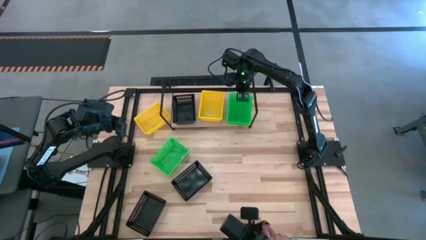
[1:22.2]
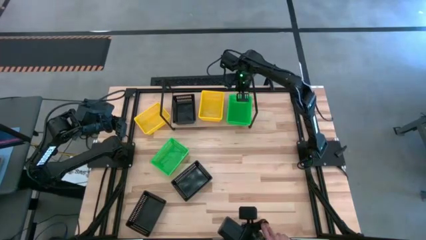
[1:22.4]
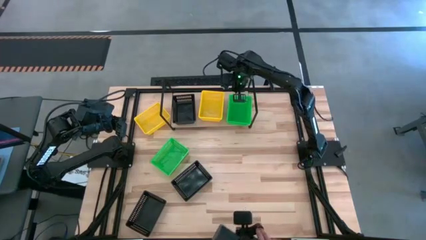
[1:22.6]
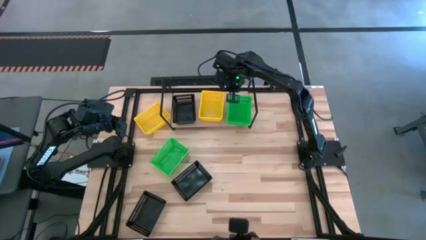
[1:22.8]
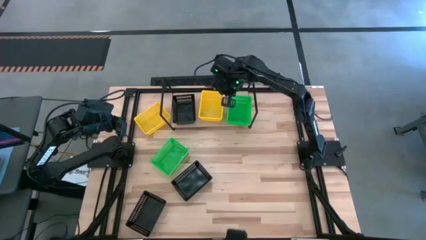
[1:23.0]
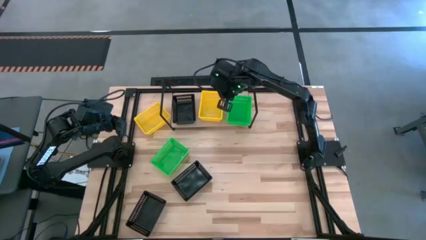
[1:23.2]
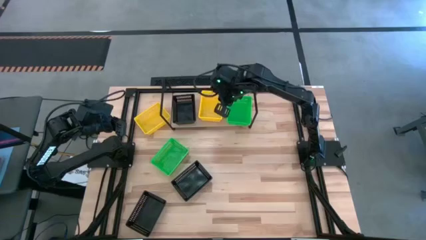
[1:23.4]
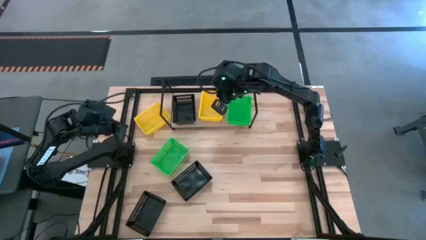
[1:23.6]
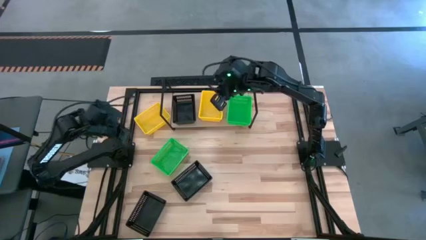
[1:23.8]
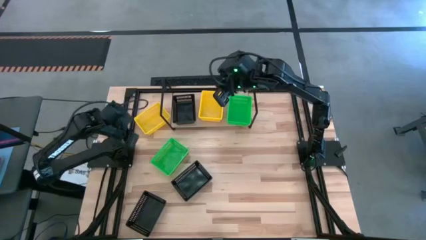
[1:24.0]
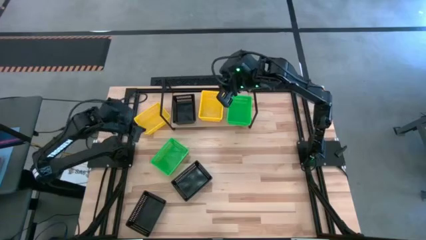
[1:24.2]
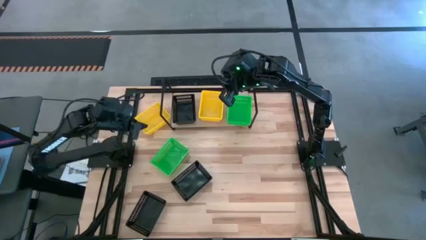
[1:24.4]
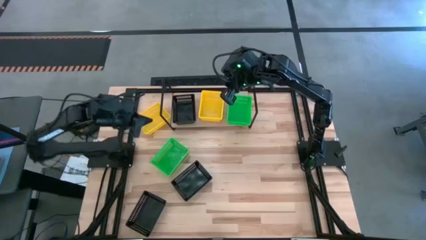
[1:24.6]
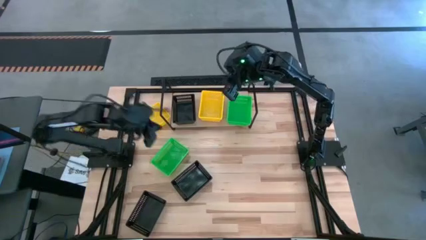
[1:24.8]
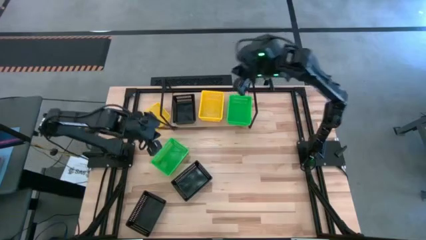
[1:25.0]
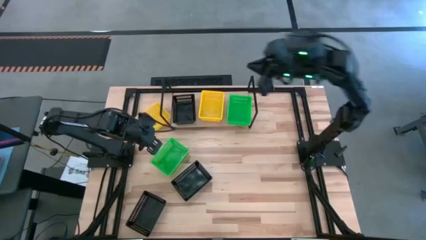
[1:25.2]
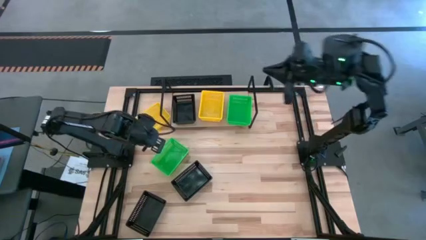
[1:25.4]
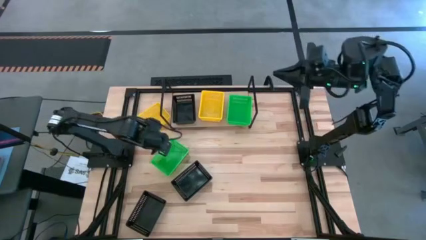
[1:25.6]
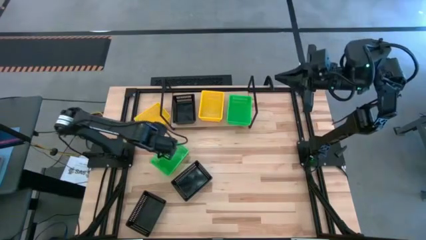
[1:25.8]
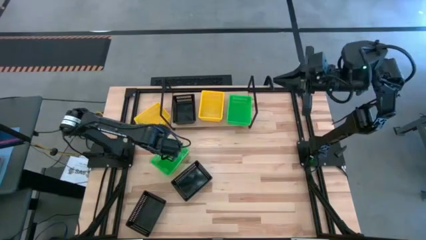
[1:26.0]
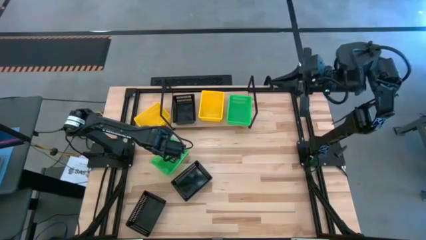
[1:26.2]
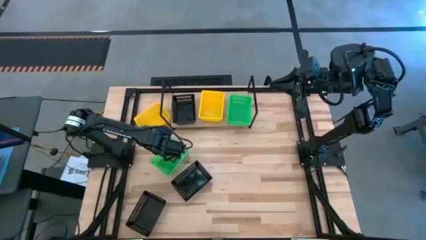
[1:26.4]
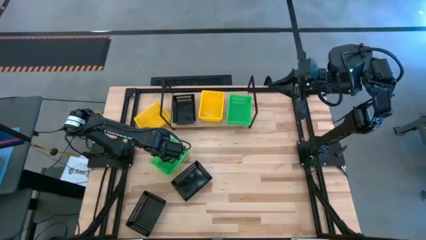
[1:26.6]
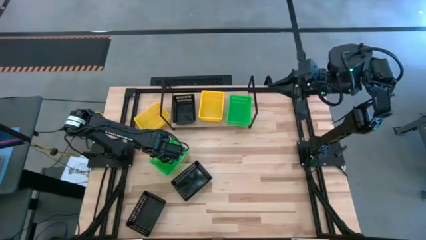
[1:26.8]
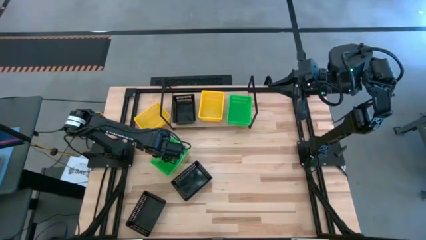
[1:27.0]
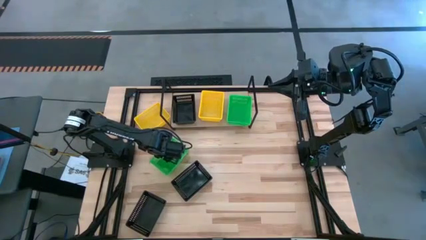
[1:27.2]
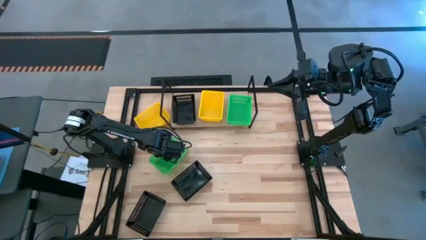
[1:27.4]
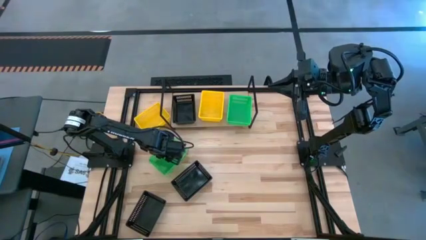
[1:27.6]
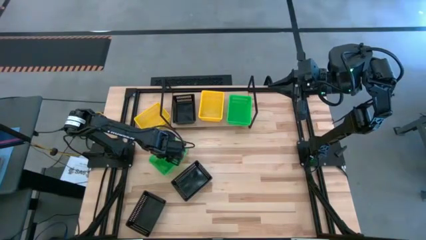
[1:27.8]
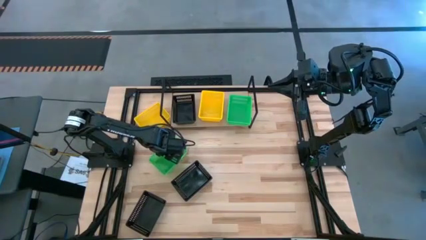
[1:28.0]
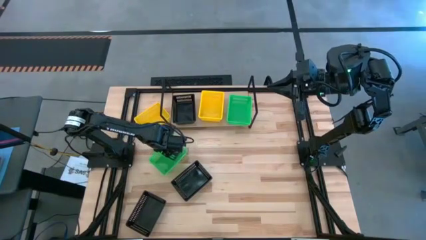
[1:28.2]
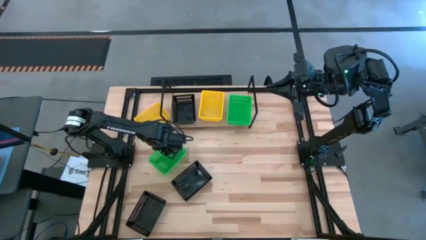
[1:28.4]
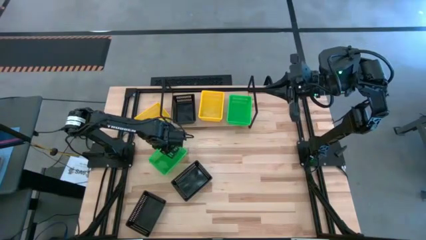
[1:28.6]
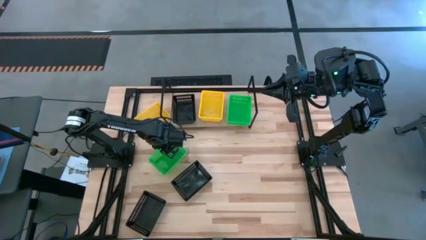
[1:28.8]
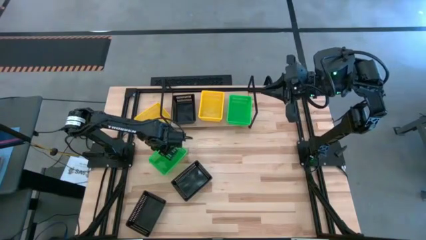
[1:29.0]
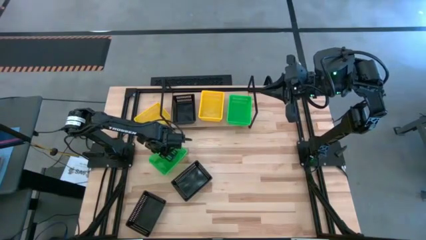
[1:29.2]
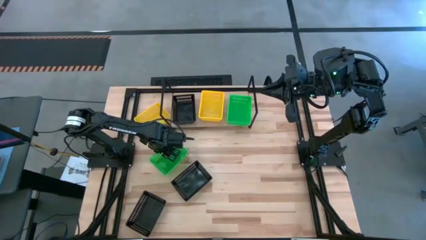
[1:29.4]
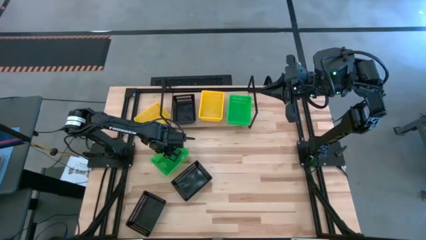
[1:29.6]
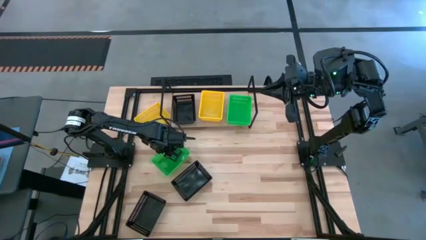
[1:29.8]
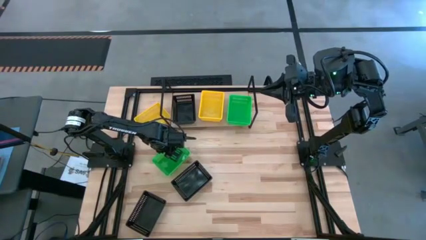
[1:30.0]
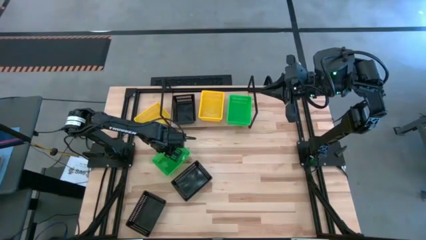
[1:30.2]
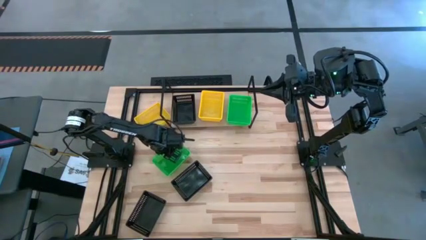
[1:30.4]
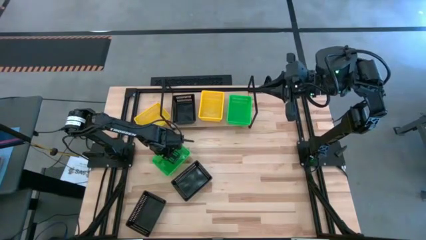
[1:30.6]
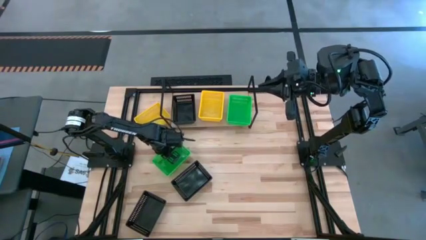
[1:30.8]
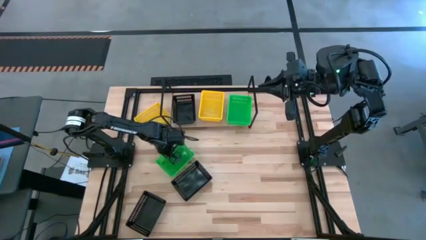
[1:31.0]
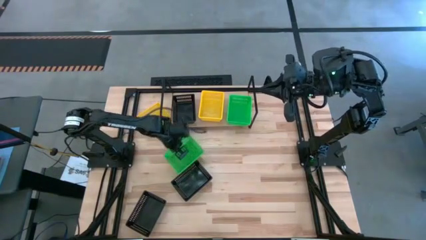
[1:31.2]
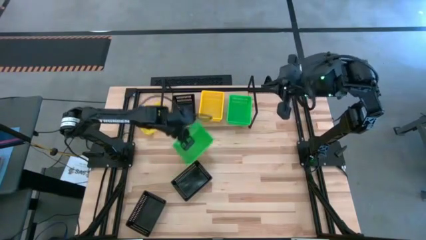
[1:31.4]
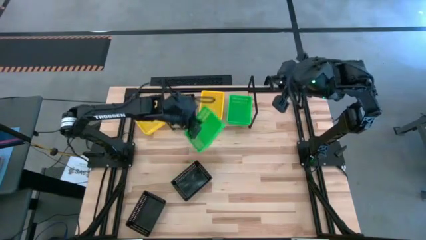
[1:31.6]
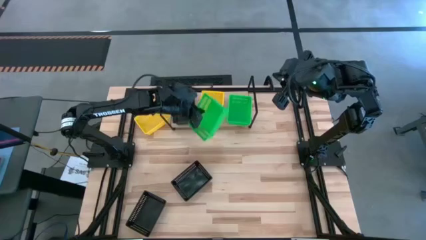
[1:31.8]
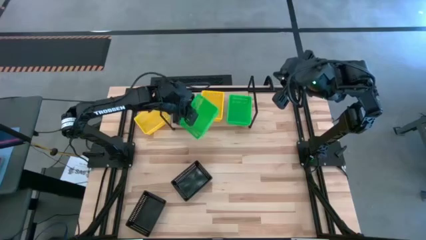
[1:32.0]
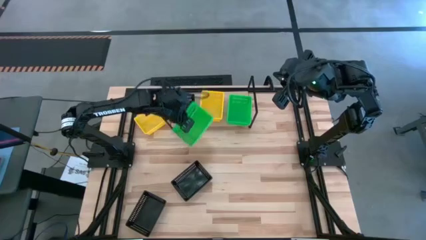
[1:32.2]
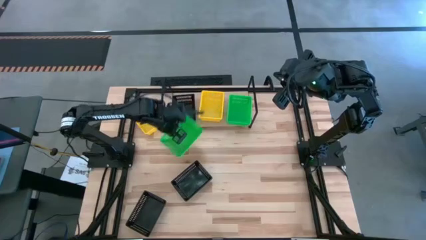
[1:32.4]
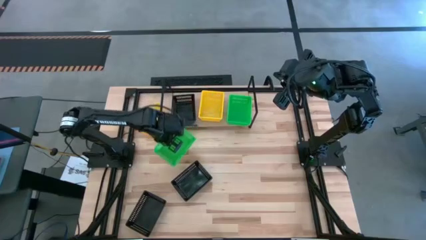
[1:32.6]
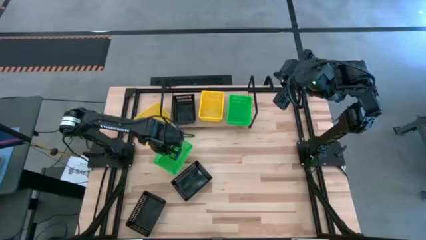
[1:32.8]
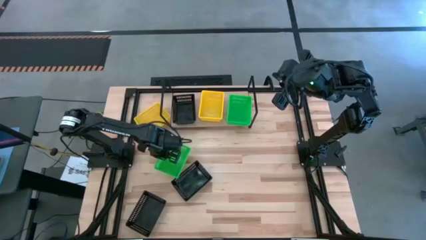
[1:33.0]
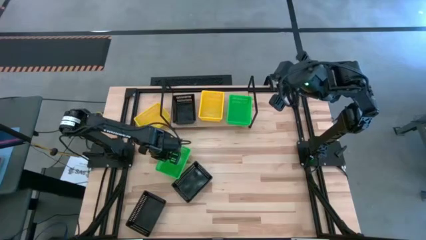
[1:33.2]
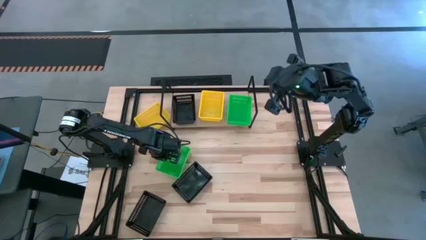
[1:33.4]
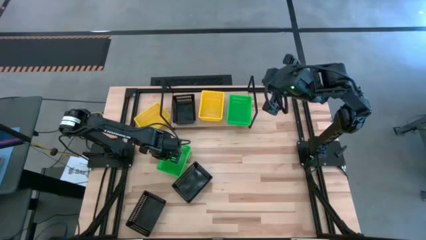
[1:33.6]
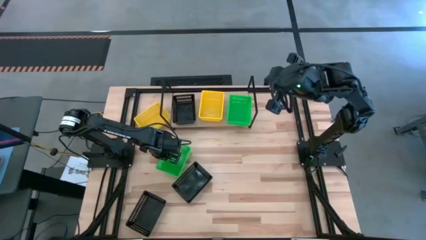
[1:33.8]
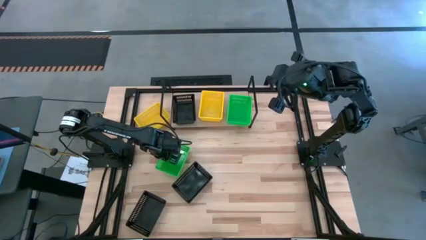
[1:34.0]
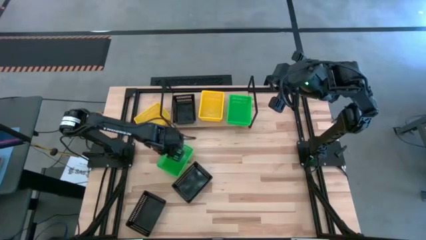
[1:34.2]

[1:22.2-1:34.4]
Task: Stack baskets on shelf by color
Adjust the green bin

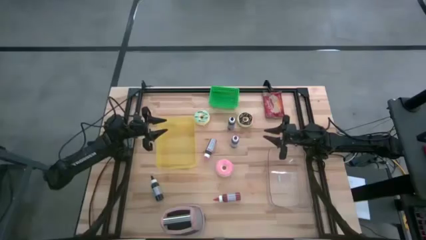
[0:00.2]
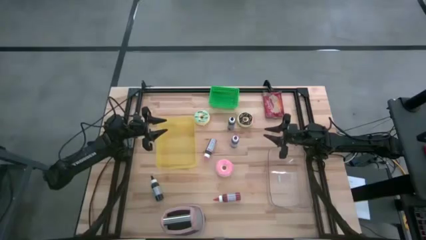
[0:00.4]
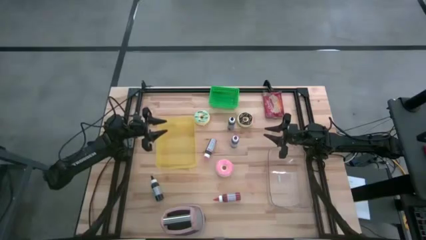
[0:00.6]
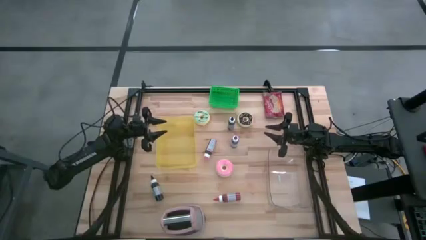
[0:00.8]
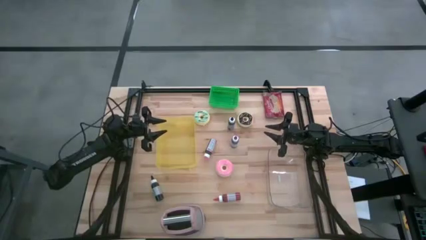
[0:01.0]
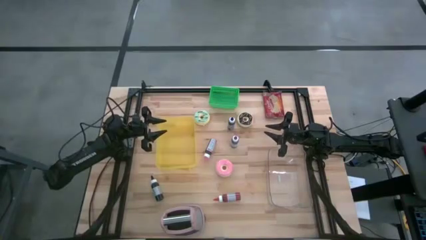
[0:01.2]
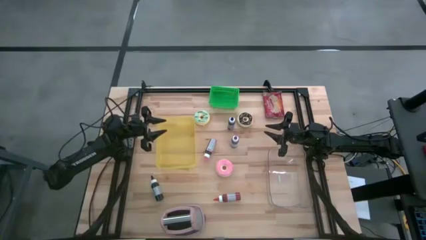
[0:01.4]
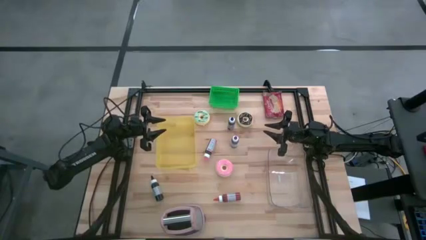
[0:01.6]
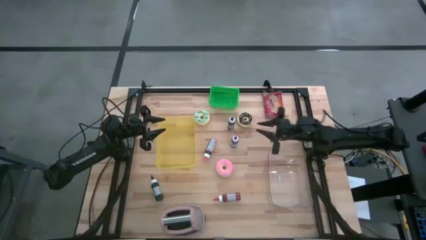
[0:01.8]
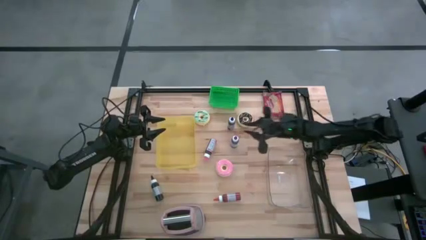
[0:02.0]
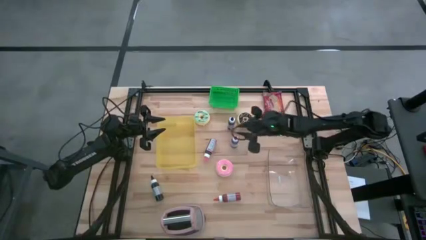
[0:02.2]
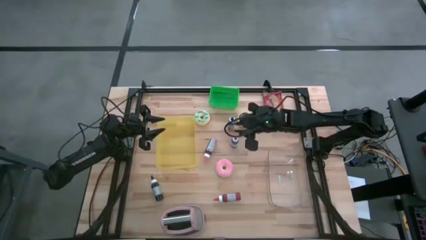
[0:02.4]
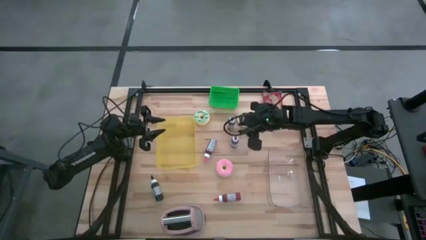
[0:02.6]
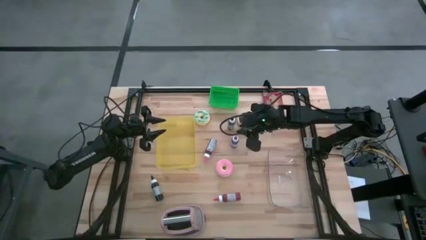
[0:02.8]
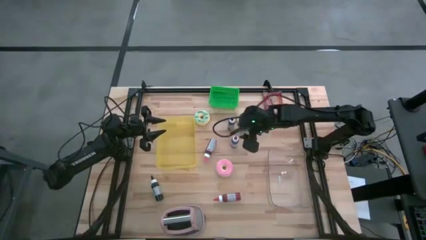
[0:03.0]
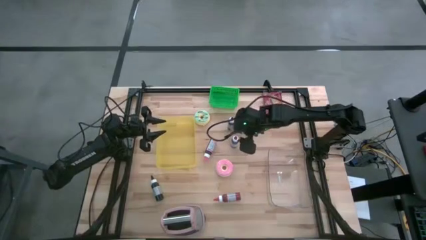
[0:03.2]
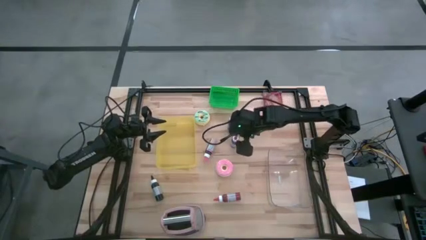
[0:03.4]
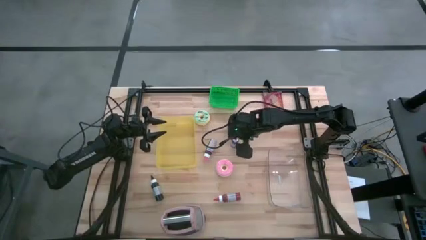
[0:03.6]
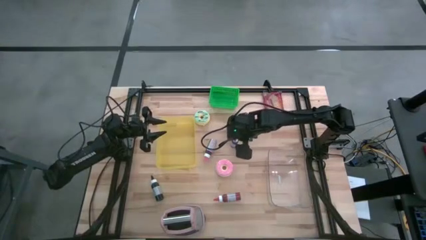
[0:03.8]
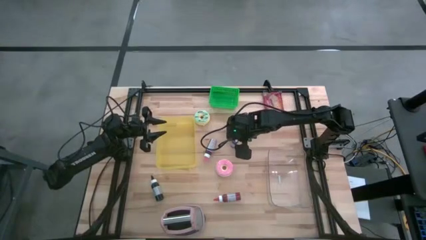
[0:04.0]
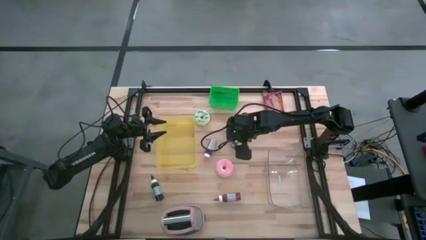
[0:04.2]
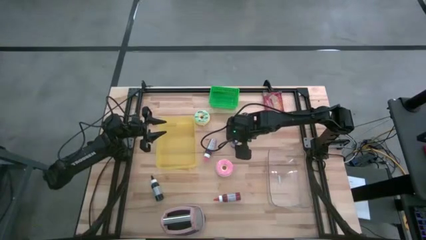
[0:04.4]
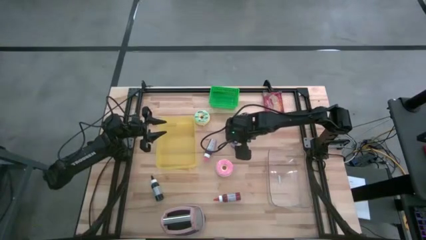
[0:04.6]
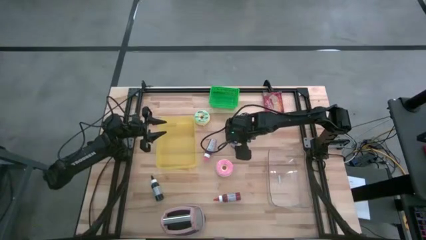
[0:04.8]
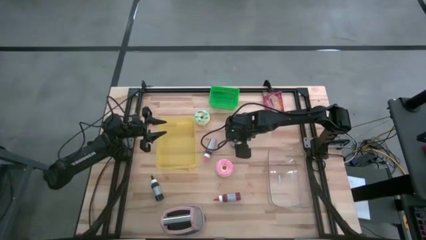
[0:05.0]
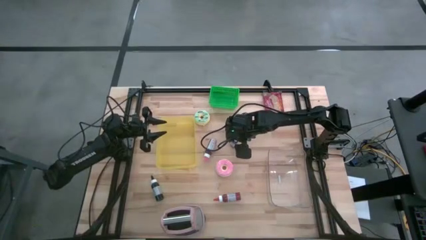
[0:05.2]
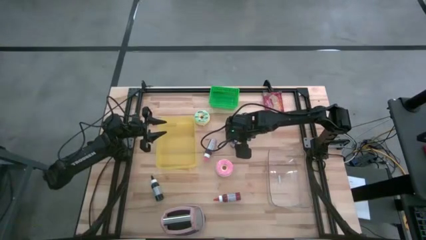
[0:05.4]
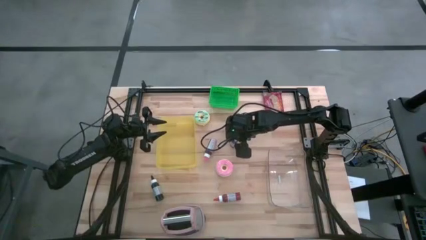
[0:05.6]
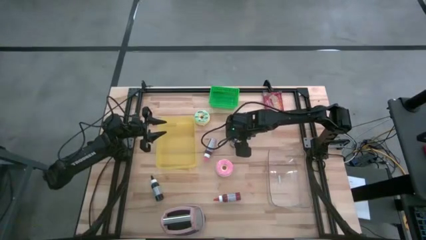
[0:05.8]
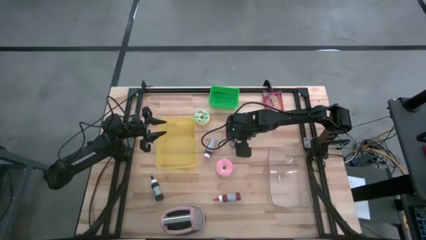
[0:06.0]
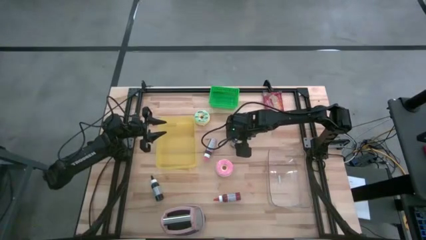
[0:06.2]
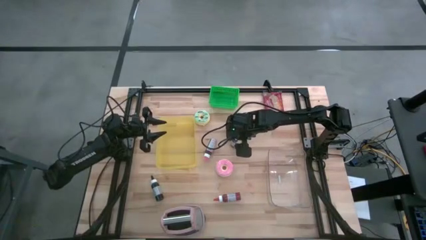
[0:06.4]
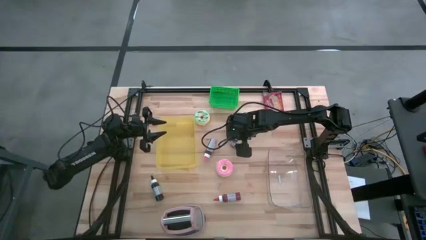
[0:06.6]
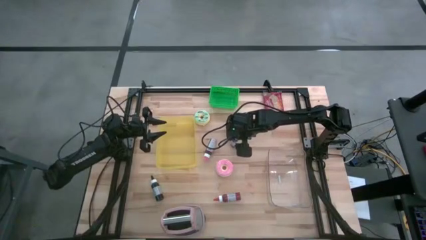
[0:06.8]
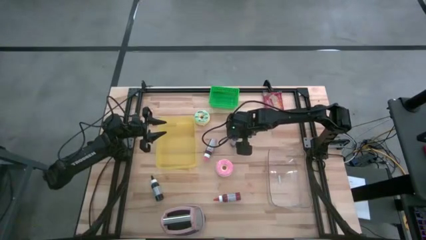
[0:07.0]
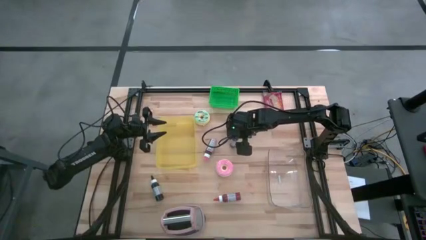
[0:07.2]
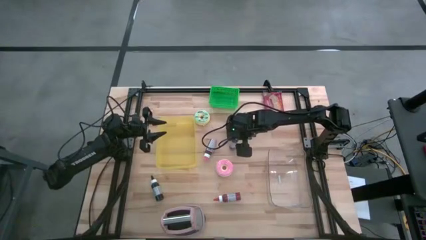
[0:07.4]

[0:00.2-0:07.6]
Task: Pick & Place Food Item
Put the purple food coloring bottle into the green bin
